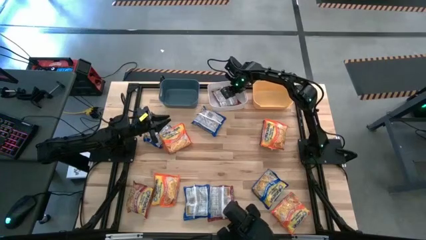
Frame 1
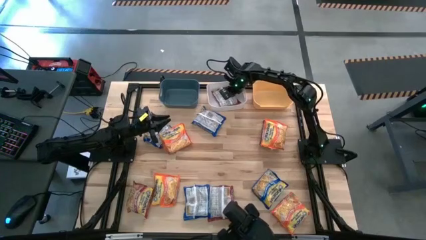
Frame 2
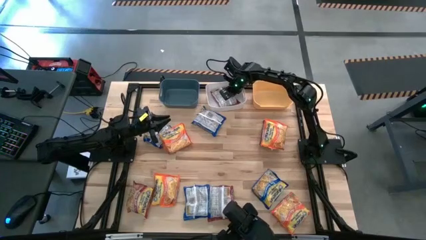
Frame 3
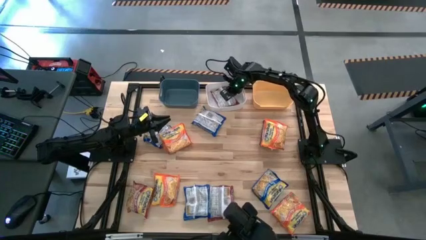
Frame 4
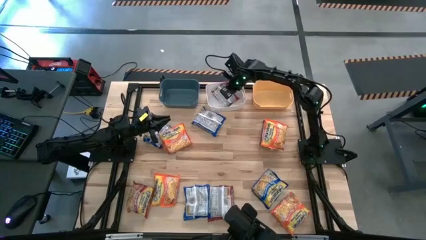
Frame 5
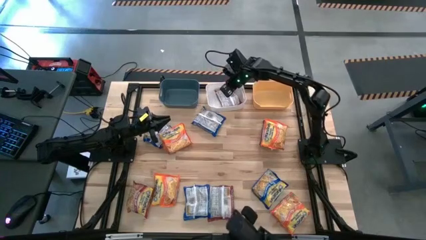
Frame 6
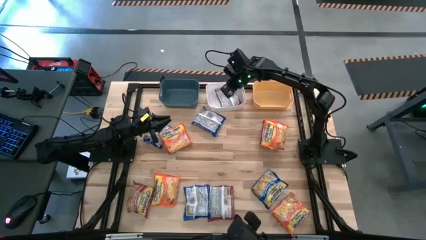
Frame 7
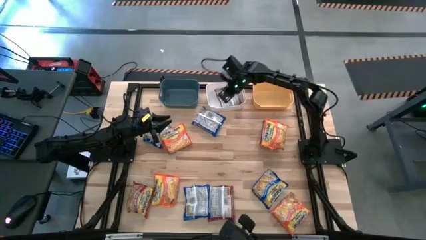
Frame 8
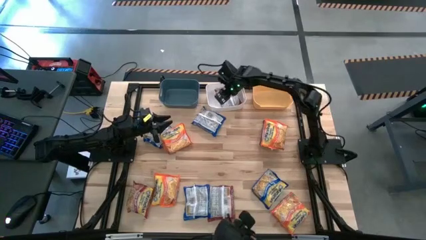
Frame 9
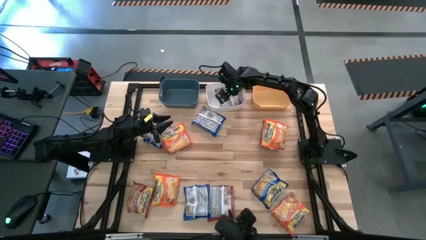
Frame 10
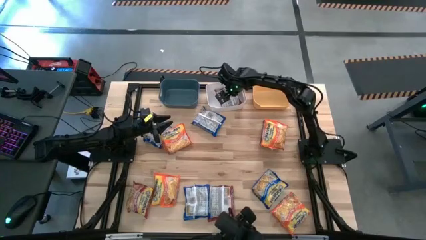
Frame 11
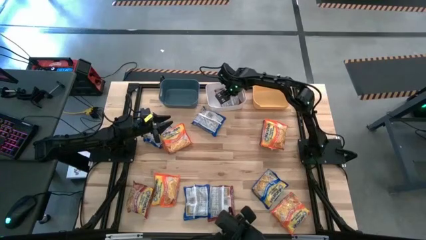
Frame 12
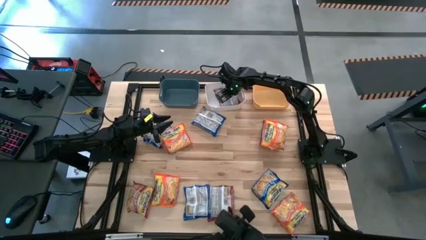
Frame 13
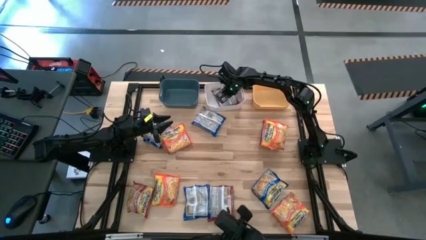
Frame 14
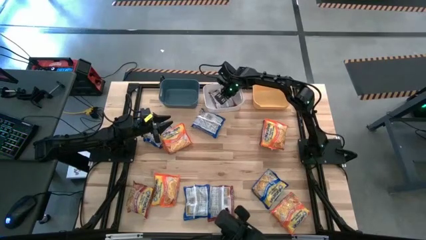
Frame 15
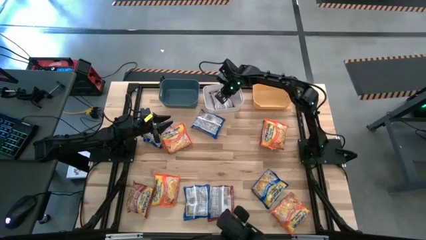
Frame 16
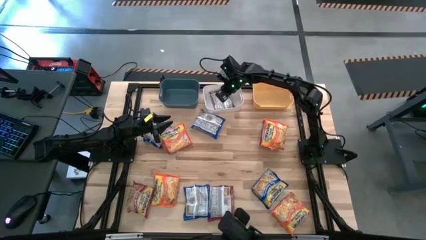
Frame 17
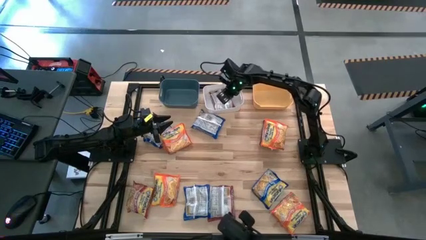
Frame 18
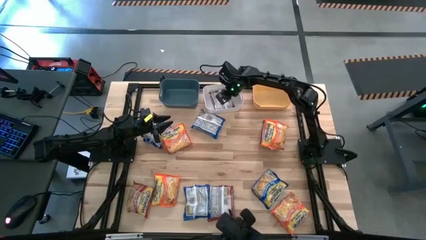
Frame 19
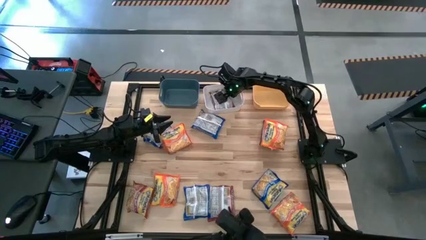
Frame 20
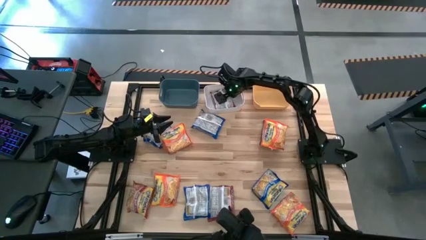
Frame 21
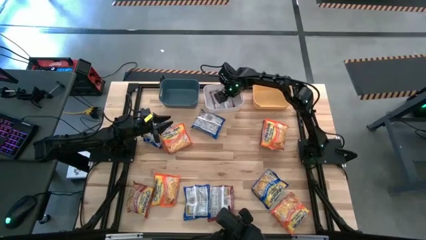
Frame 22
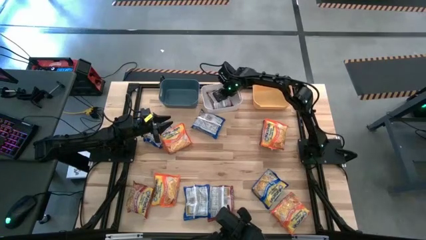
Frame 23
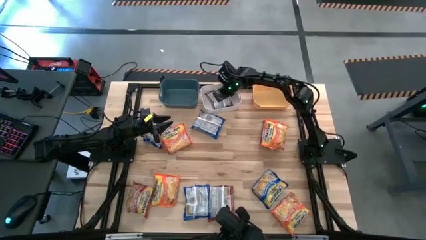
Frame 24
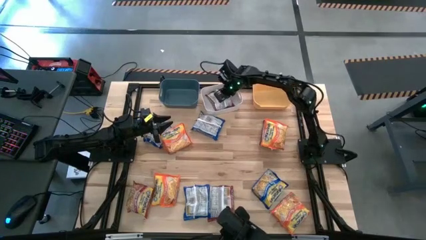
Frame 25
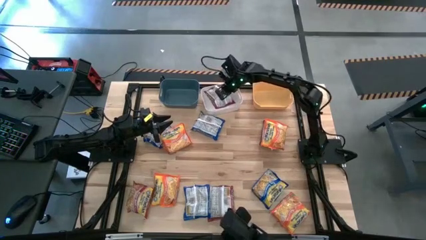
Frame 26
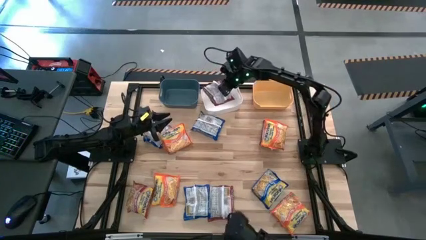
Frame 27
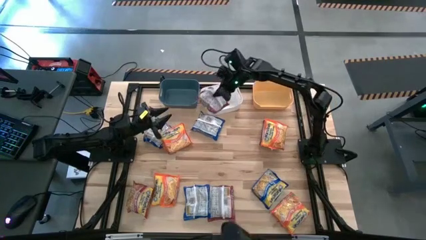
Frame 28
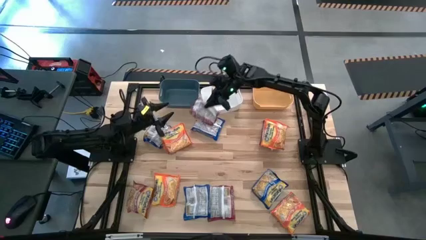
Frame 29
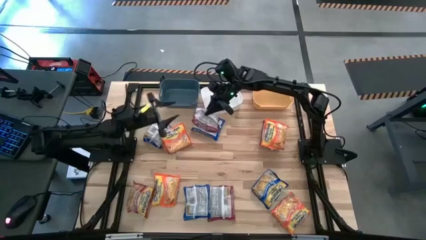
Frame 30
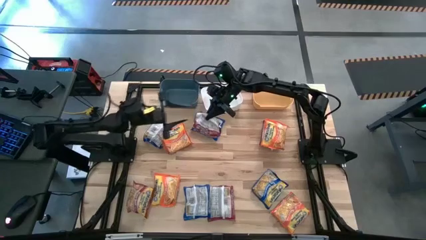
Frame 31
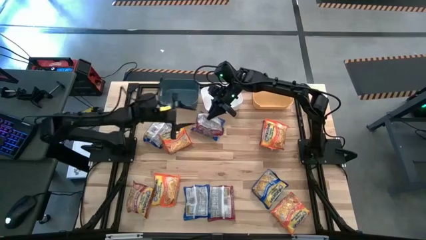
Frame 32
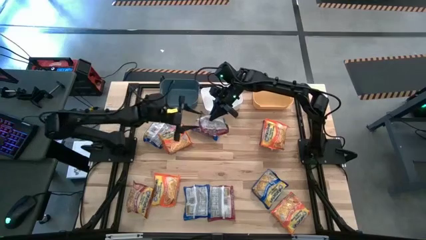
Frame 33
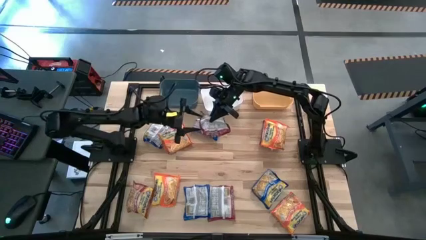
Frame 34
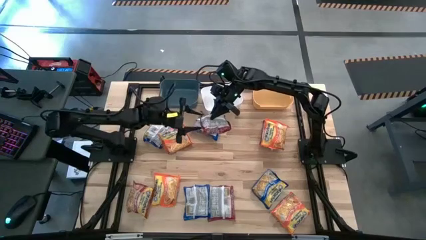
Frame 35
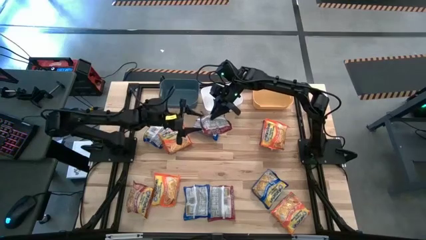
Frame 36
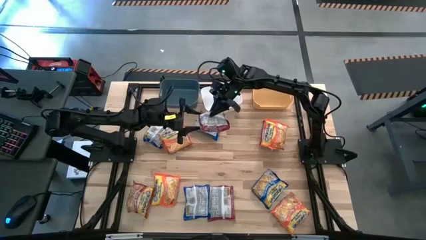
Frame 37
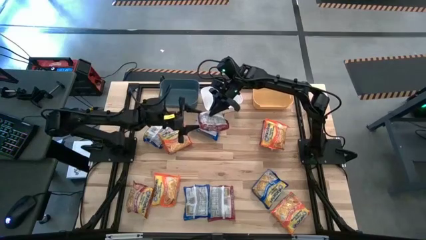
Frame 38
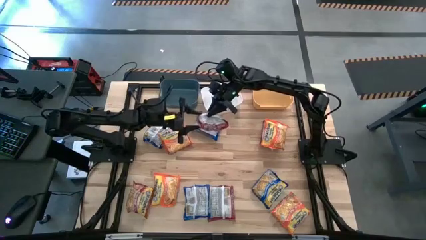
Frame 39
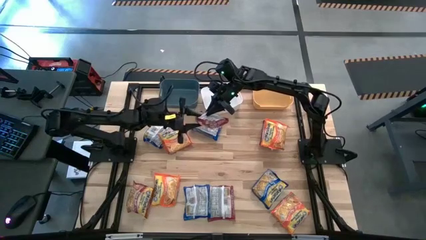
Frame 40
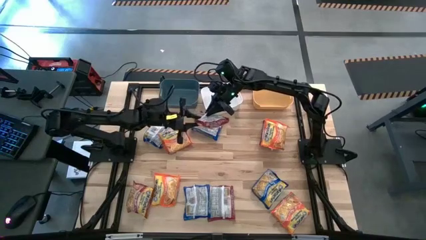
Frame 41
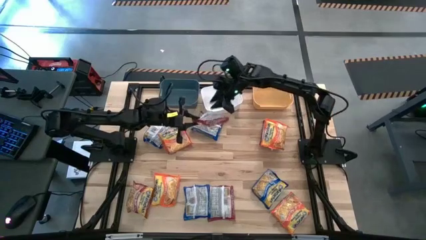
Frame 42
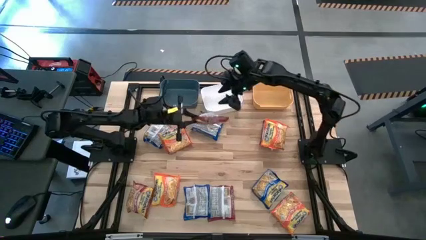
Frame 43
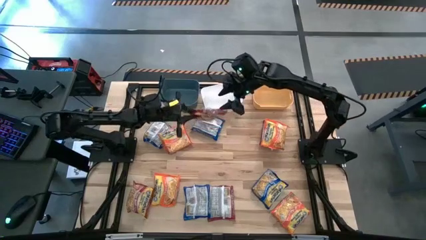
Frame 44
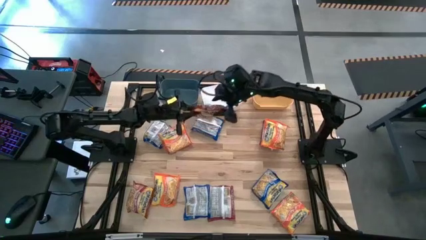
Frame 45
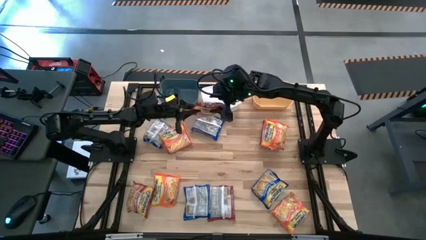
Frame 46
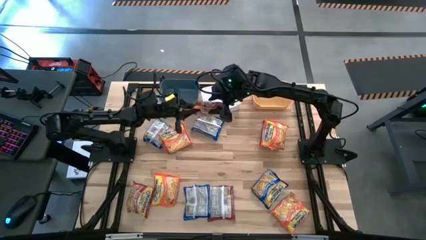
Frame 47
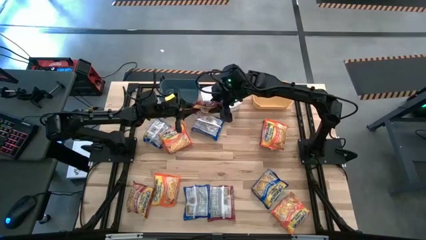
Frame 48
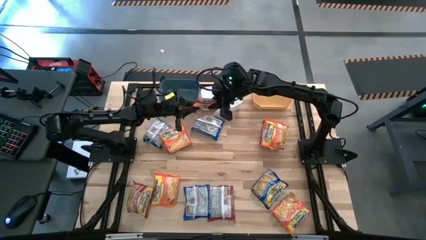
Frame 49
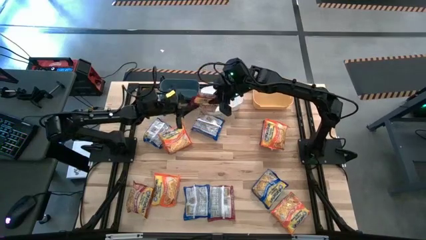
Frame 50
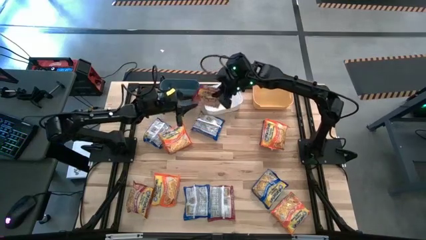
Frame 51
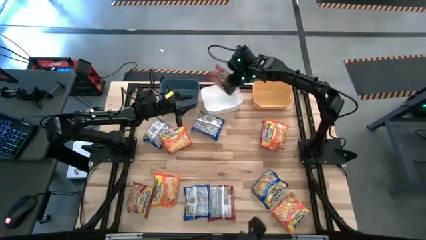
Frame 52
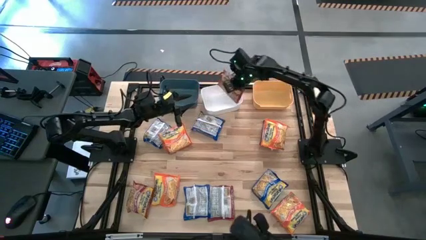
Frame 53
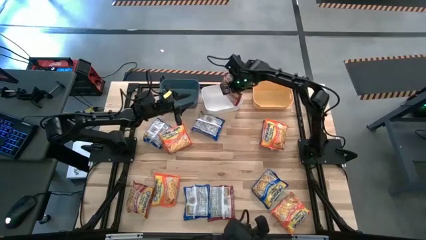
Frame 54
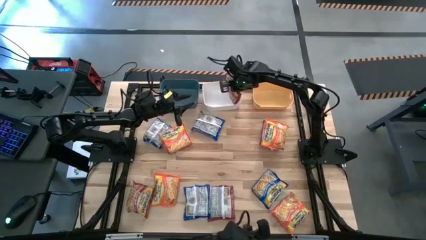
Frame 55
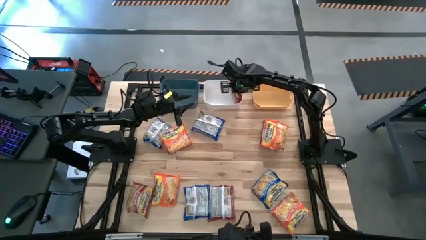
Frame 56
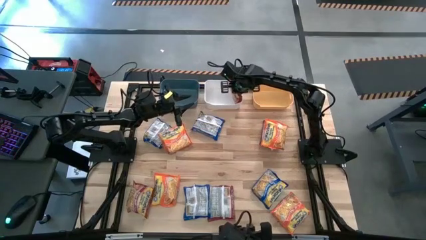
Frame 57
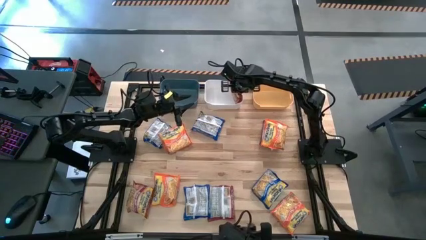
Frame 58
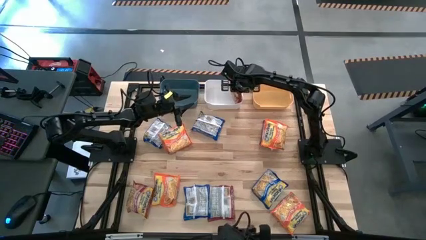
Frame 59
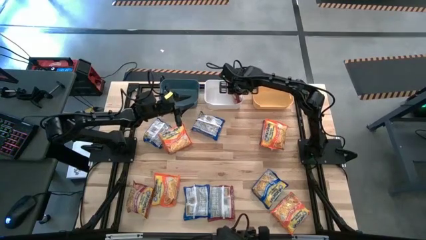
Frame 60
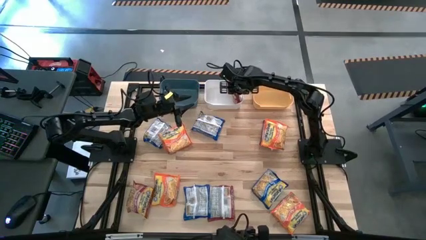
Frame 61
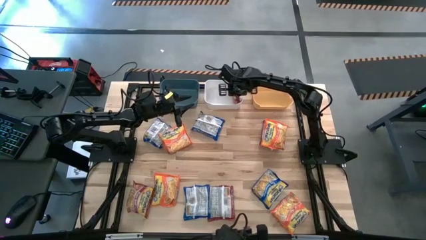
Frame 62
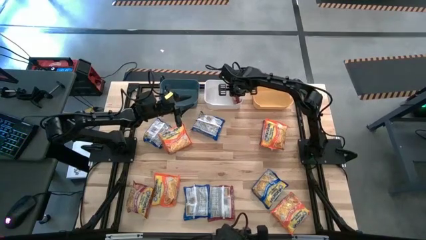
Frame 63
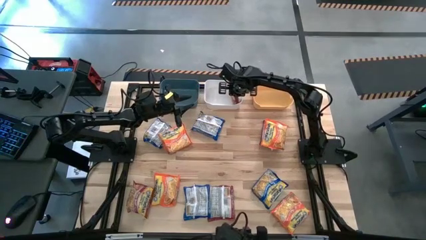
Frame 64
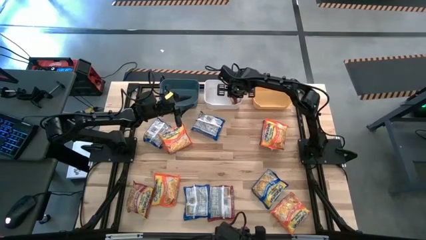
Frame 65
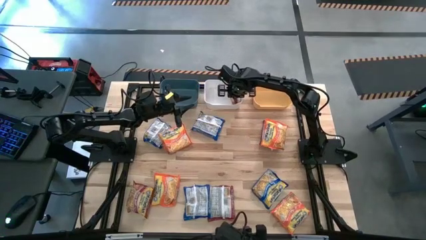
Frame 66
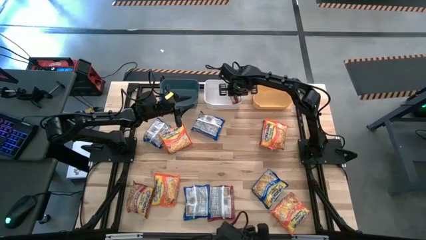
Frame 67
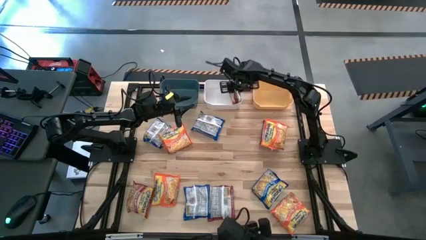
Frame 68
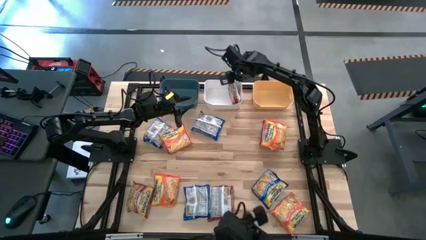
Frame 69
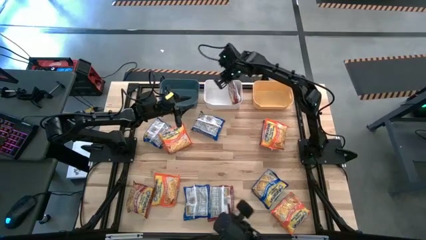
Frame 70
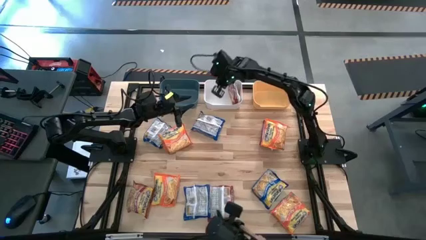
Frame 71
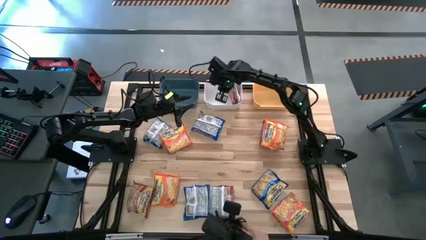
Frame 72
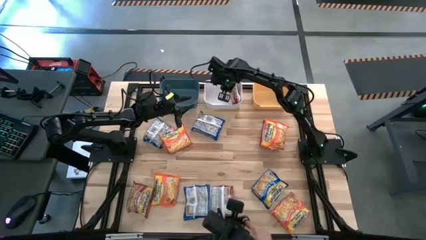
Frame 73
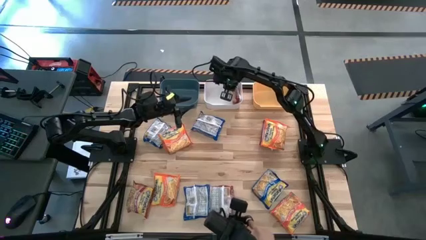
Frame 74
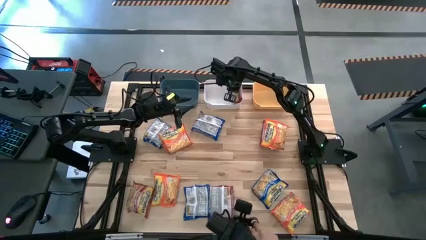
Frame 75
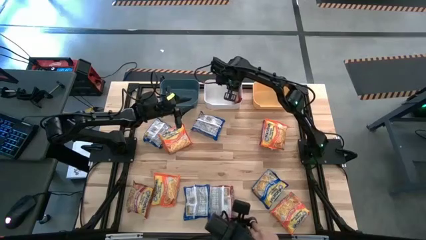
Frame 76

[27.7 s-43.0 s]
Task: Sort Maruchan noodles
Put the top middle red noodle pack into the white bin

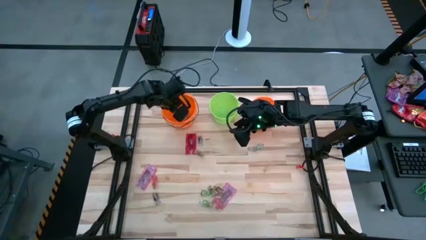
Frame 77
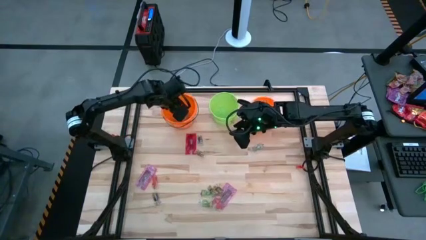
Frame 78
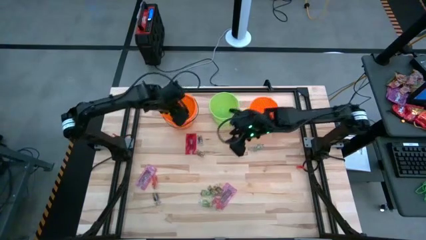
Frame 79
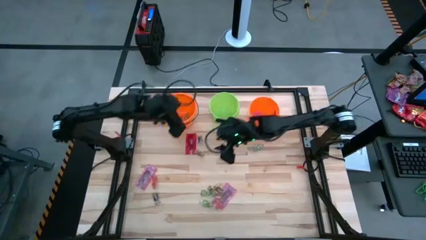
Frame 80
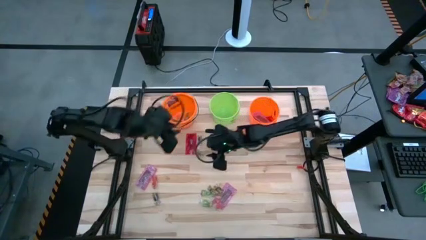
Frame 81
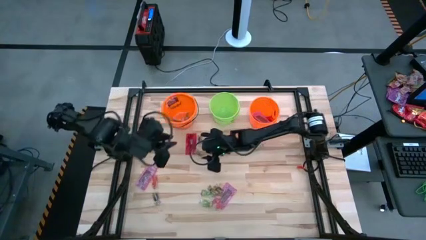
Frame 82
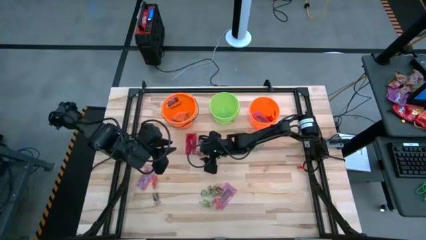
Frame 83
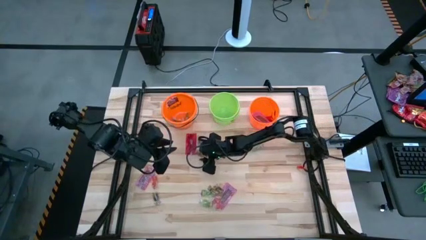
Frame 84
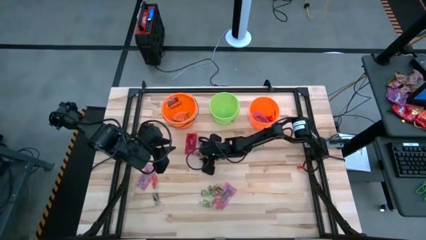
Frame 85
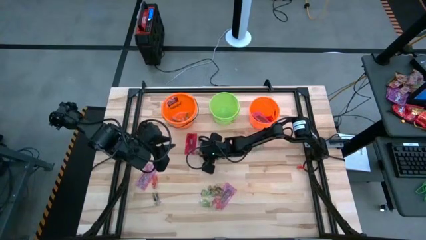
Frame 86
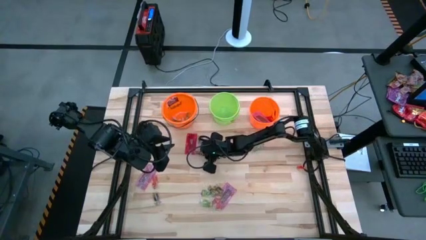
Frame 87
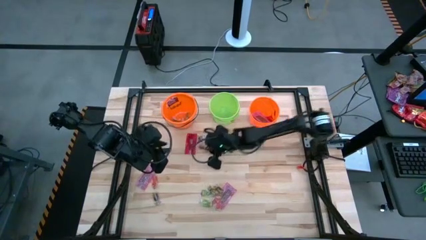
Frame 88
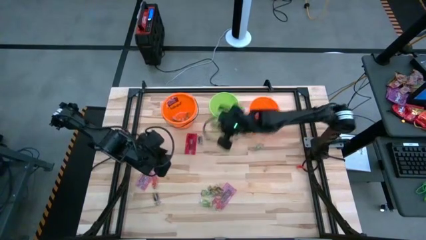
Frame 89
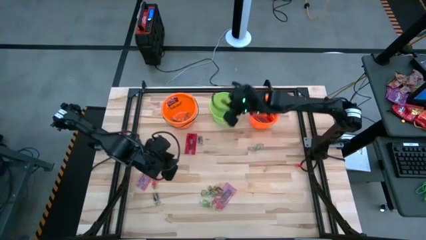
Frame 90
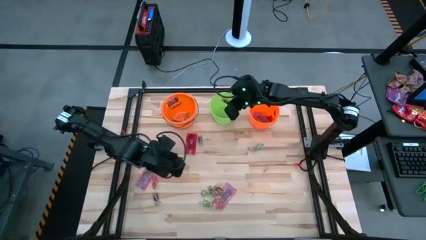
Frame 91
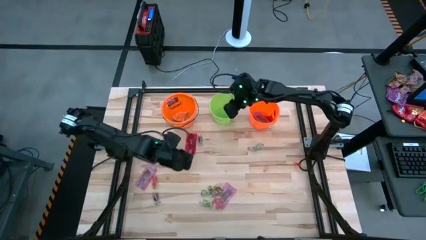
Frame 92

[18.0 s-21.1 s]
Task: Sort candy by brand, put in halloween buckets
Put the black candy into the green bucket
